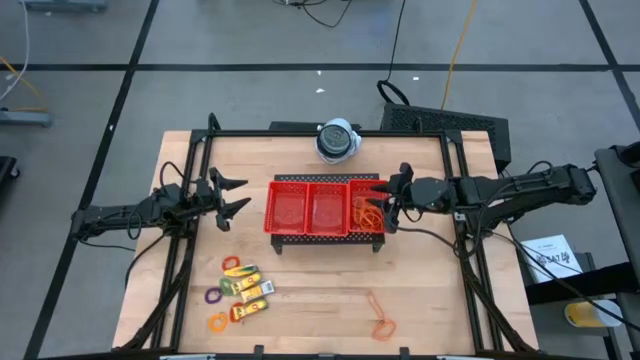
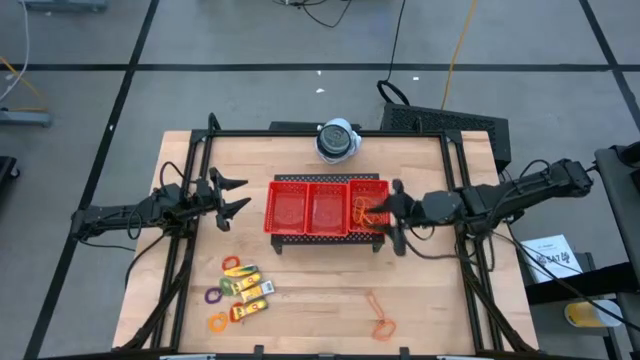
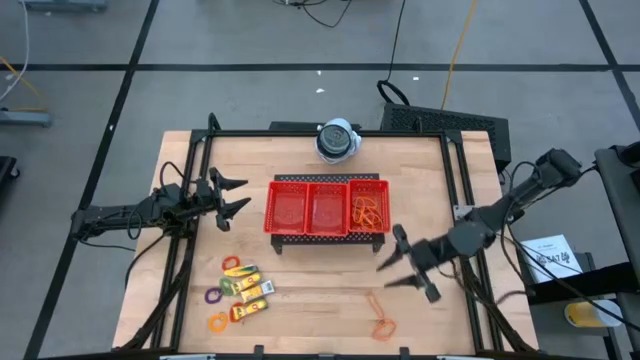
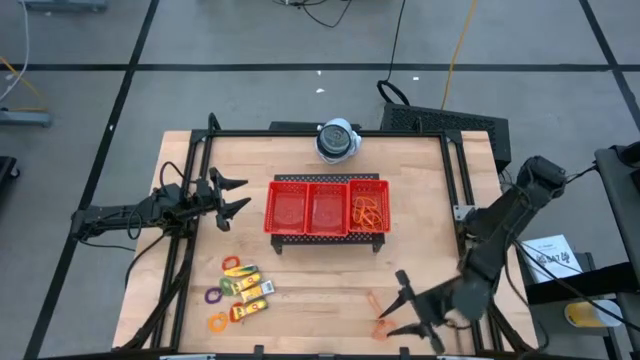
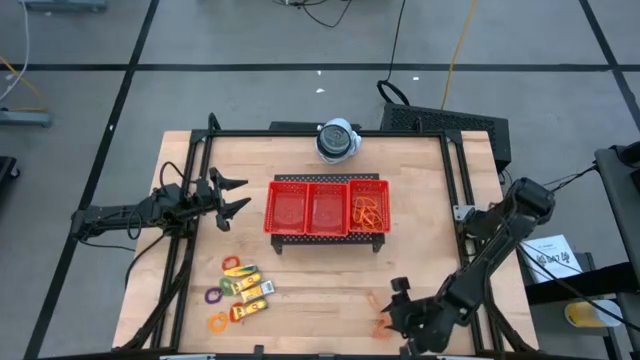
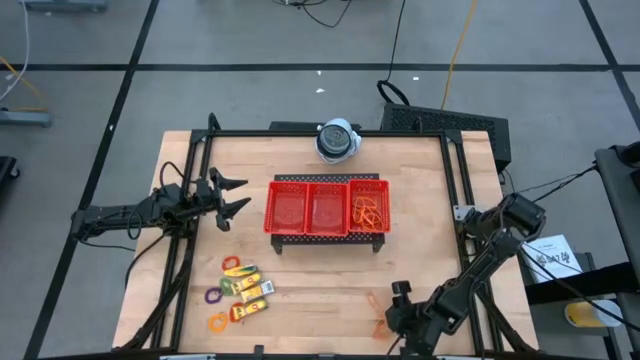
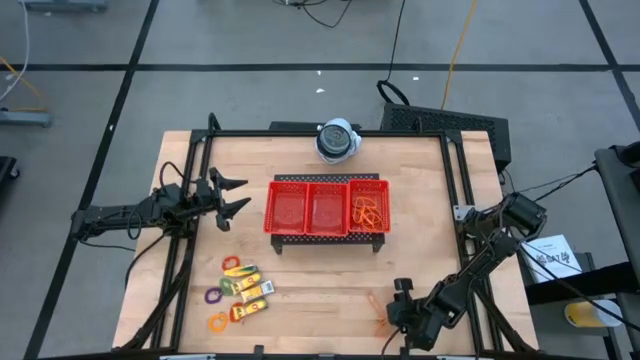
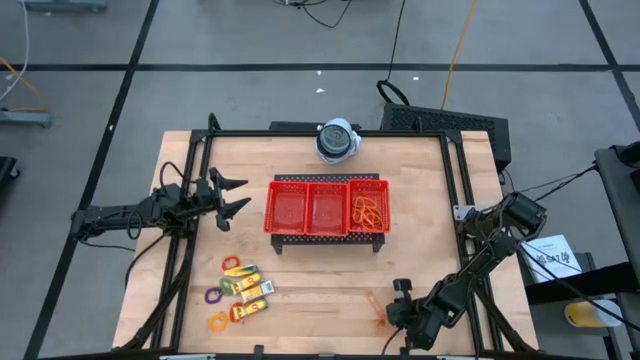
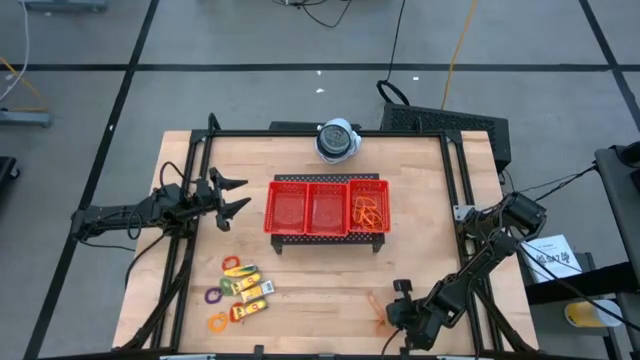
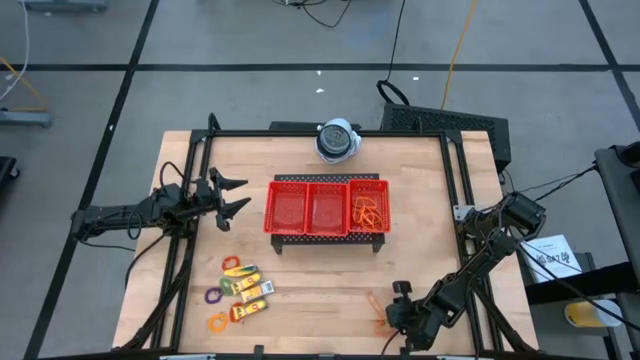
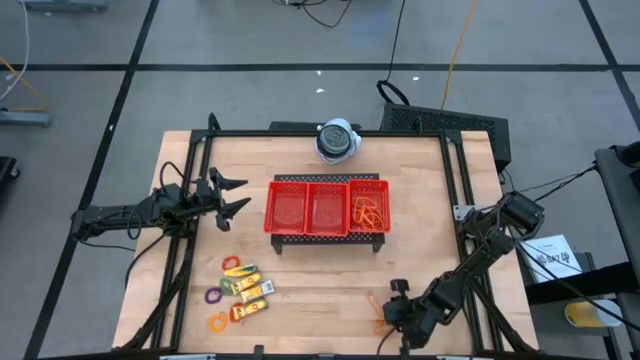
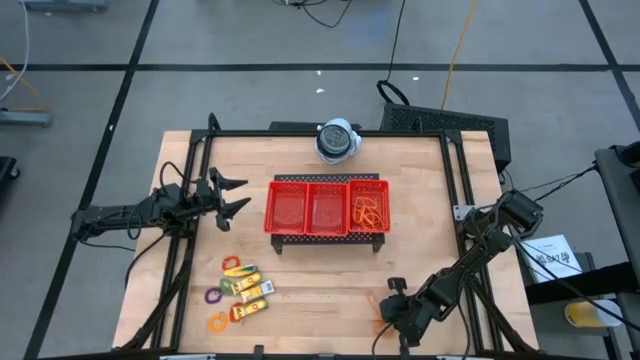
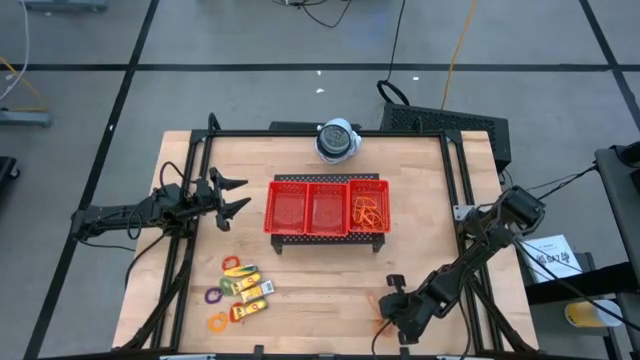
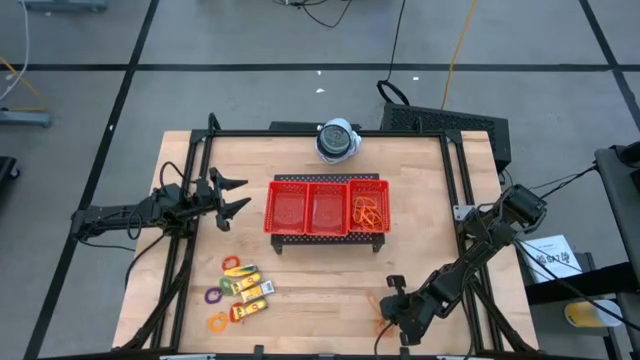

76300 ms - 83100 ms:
Task: Pick & Place Office Desk Supplies
Put the orange rubber band into the right red bin

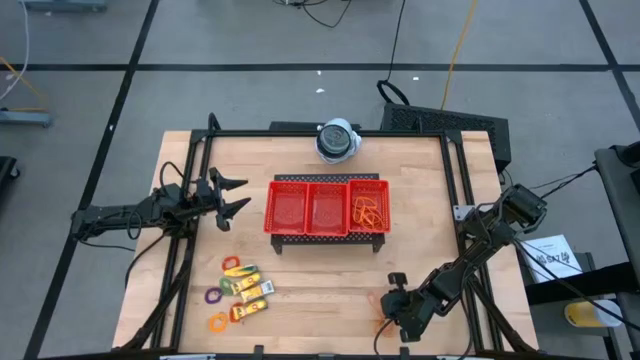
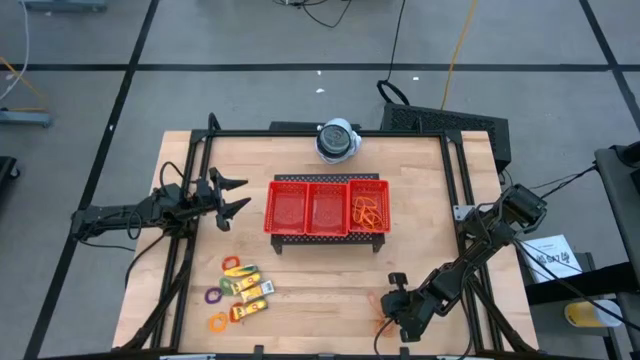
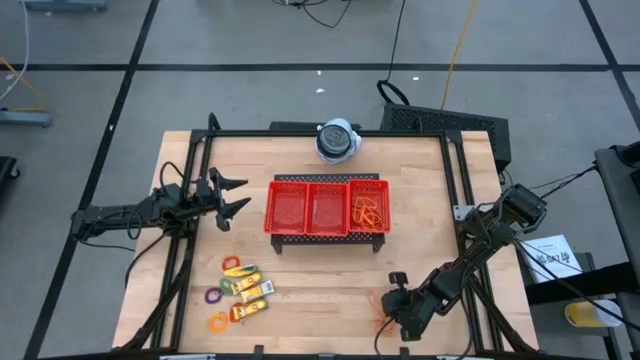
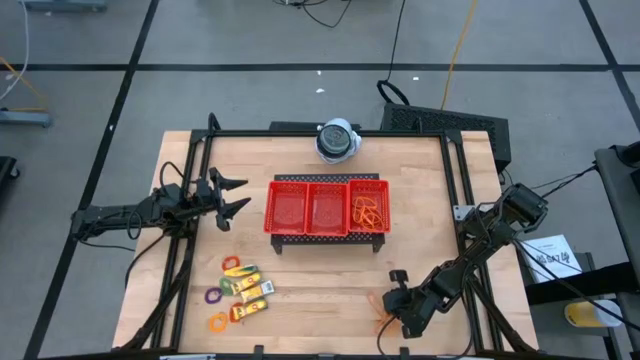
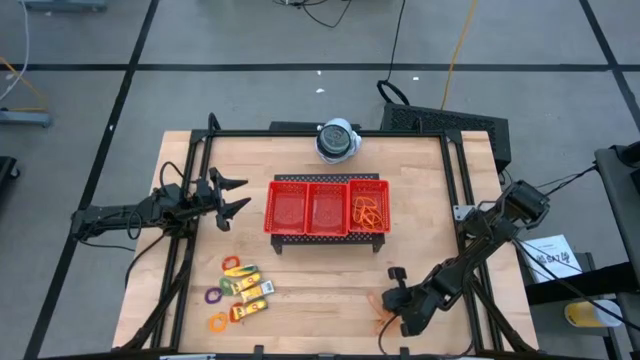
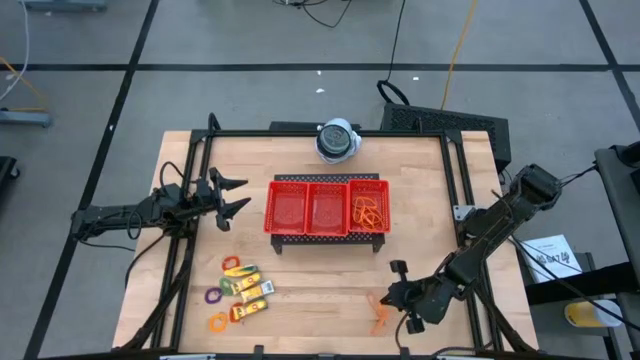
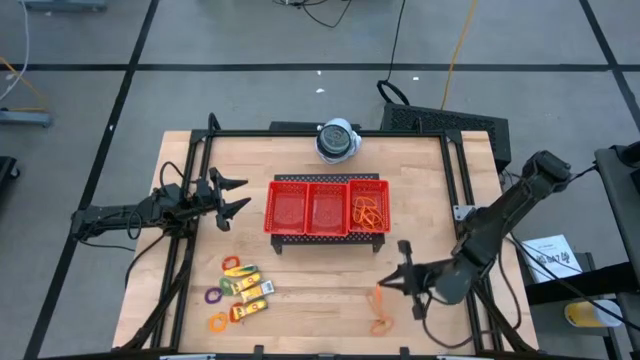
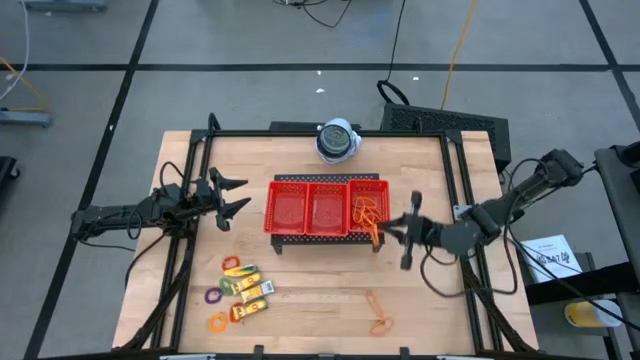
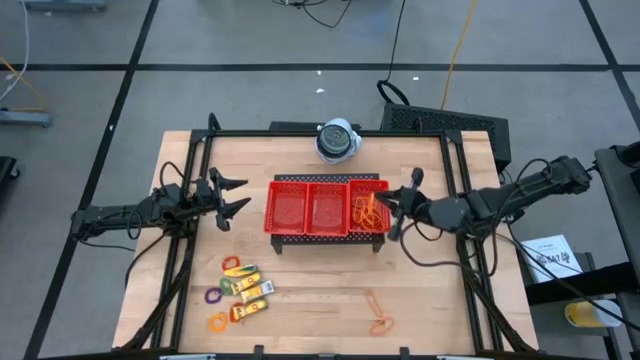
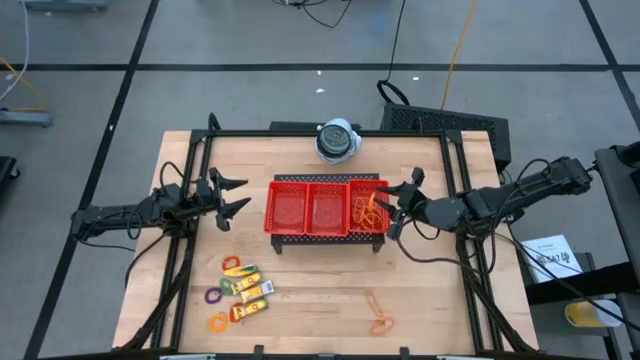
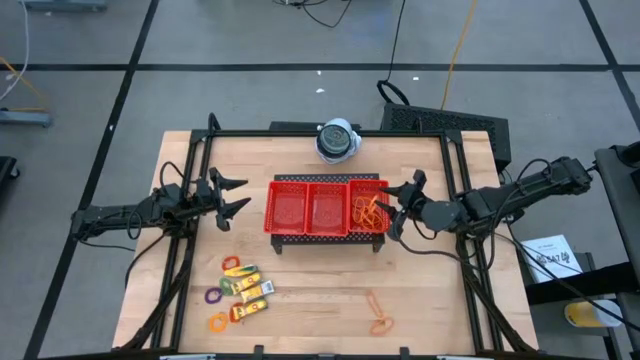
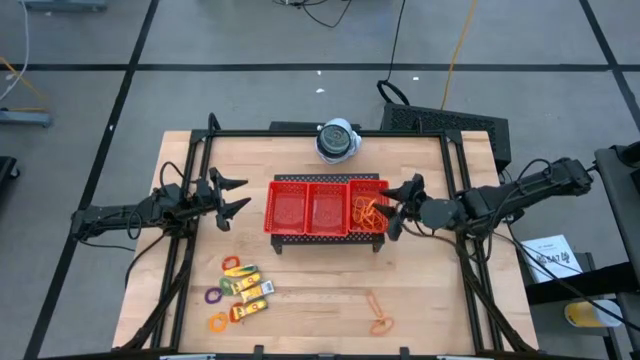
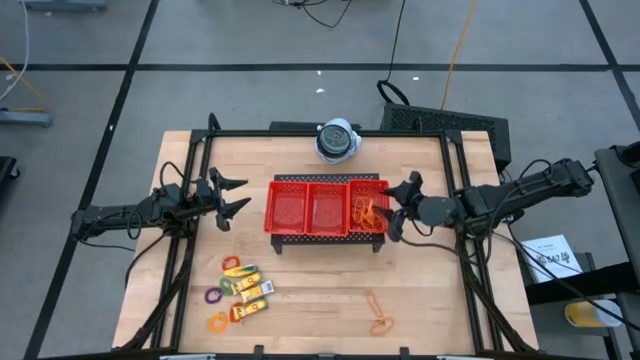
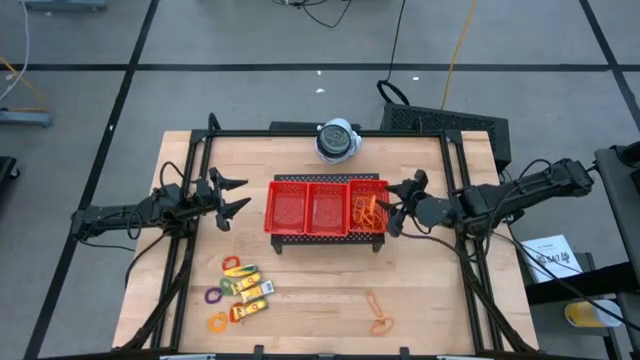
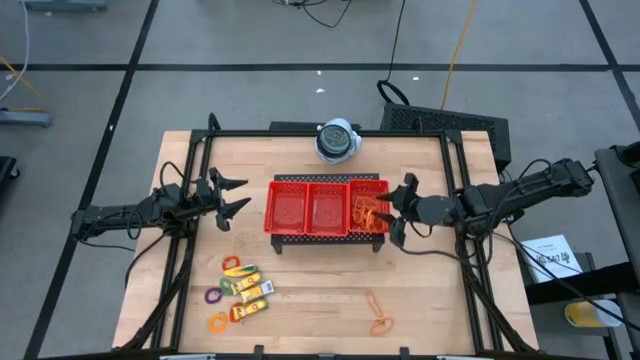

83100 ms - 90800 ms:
Put the orange rubber band into the right red bin

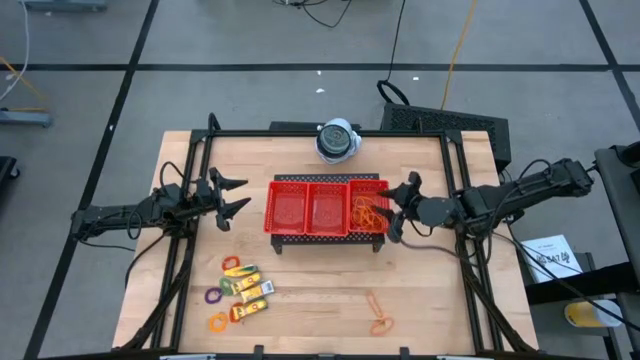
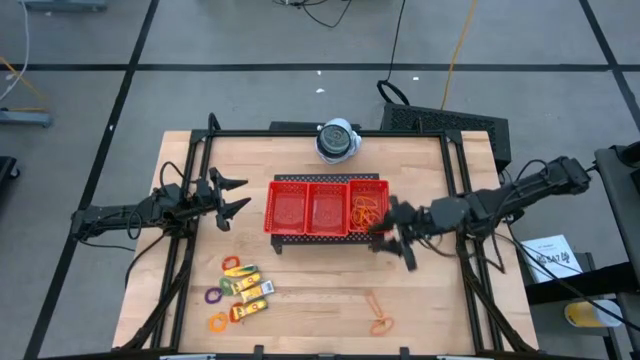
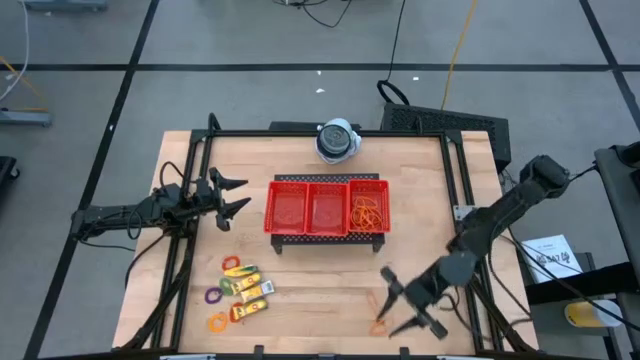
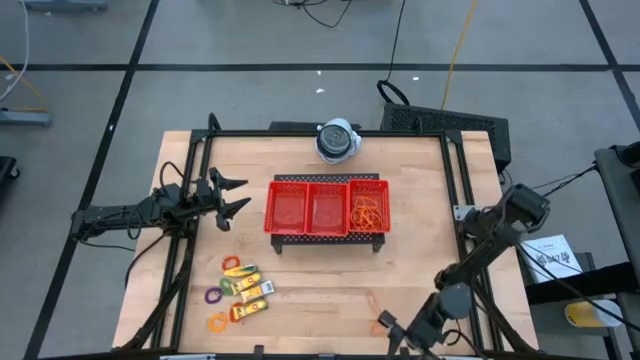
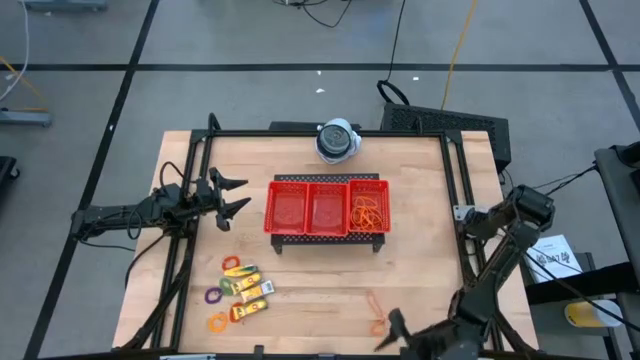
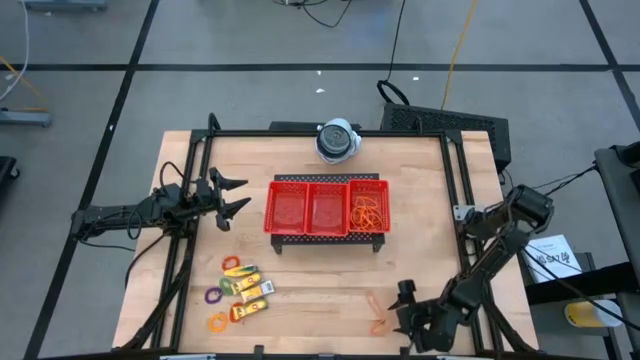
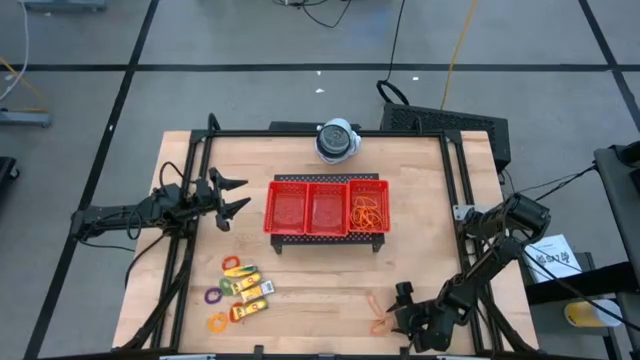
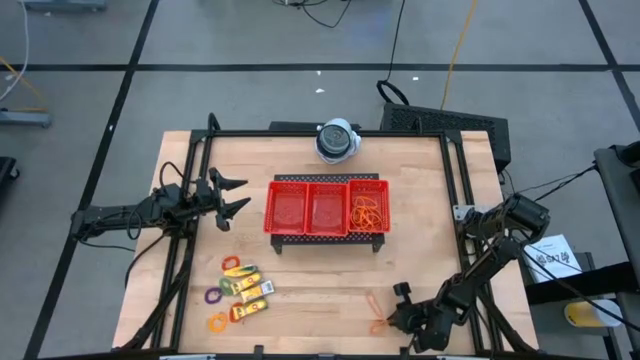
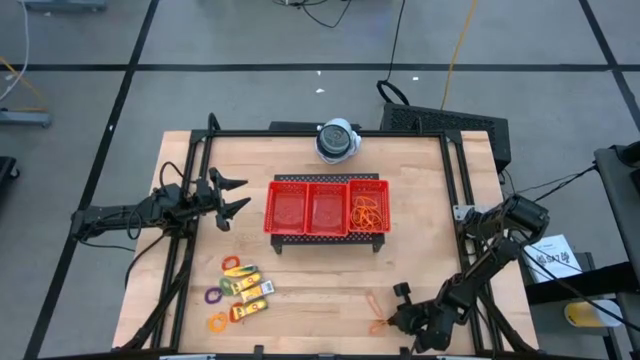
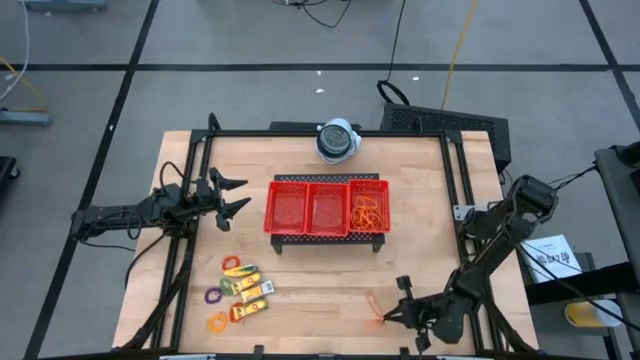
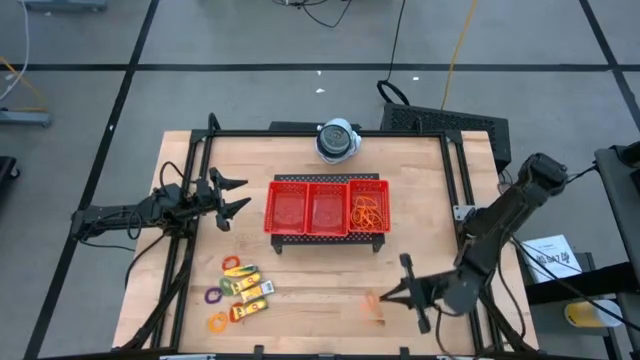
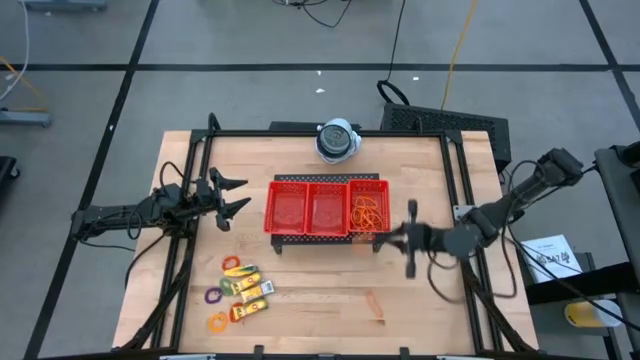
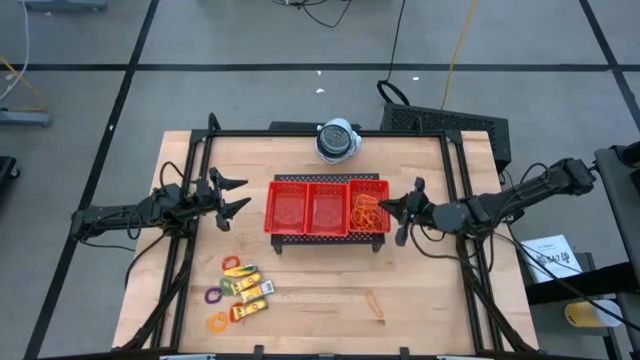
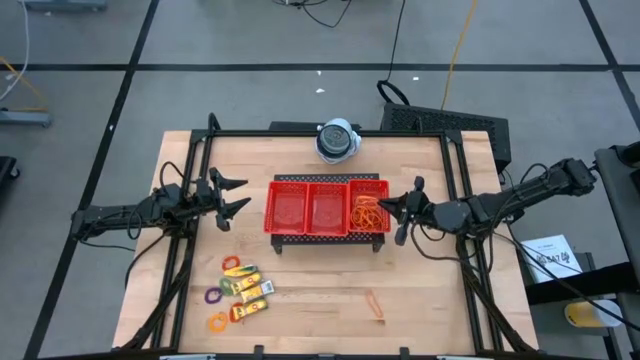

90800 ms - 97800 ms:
Put the orange rubber band into the right red bin
